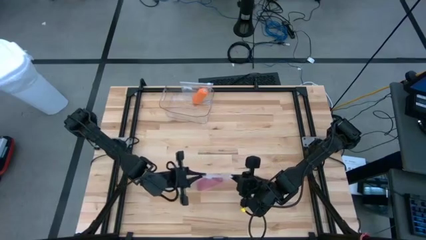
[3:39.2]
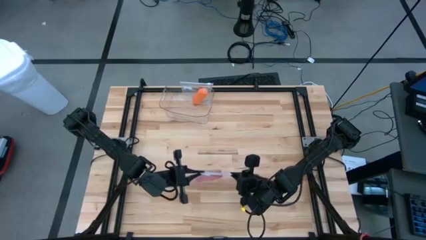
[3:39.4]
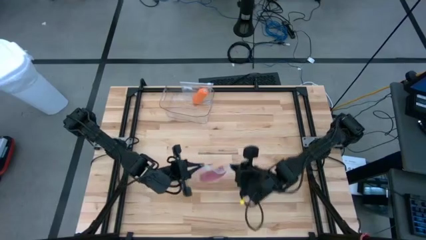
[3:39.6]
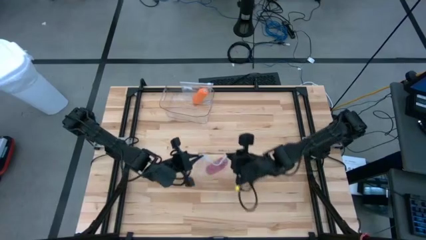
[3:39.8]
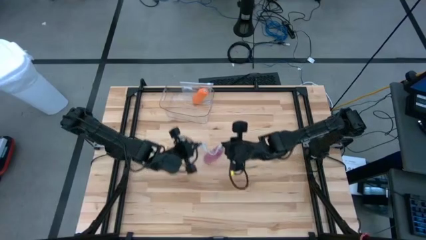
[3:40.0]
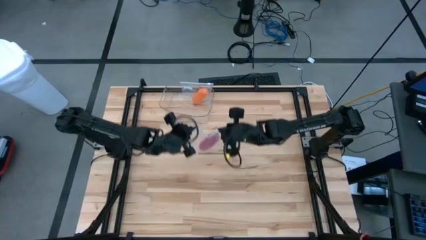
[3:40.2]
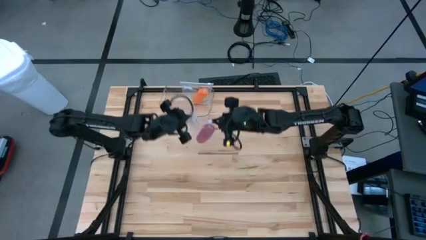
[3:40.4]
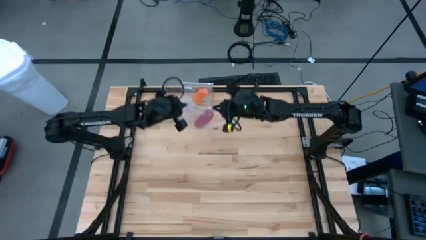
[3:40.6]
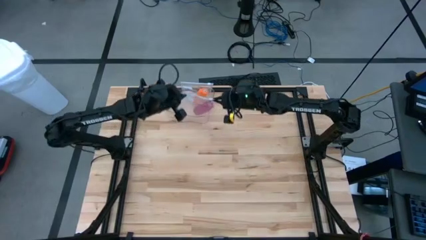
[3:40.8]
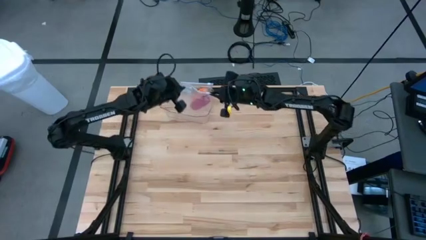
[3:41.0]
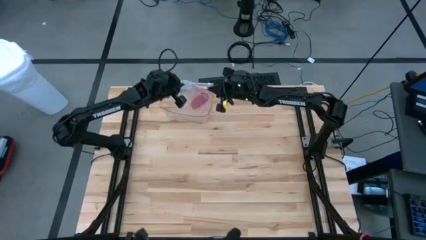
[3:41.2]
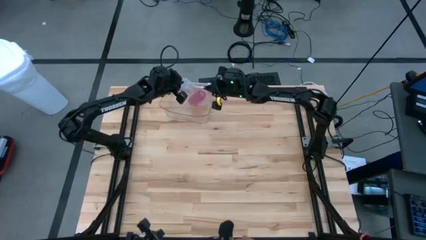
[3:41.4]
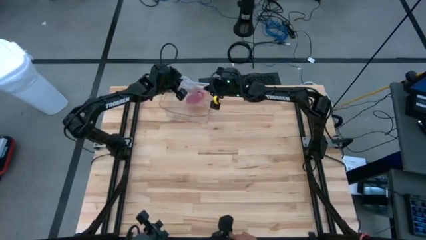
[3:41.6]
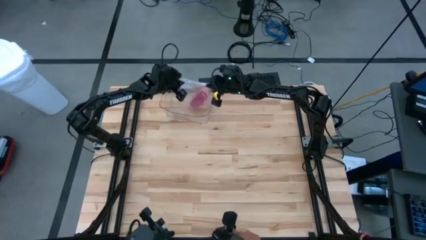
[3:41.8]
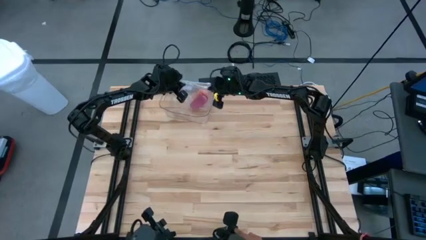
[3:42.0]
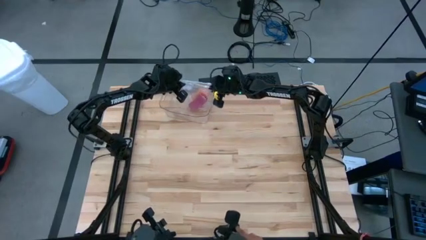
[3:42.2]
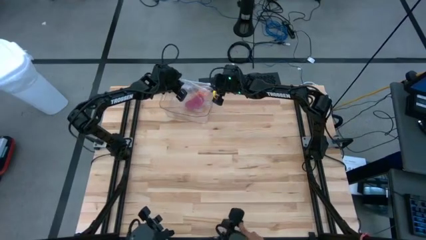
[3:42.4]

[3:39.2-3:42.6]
Task: Roll bandage
Put the packed rolled pink bandage into the transparent bin

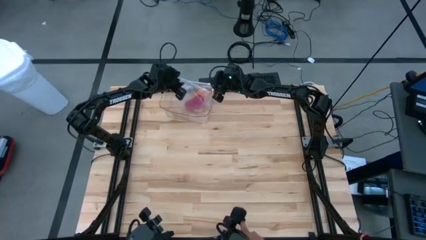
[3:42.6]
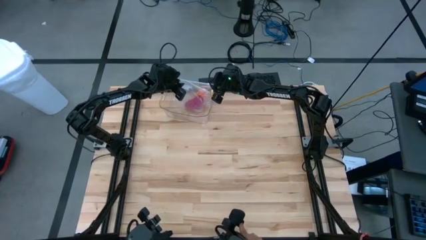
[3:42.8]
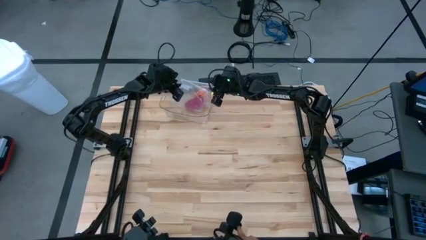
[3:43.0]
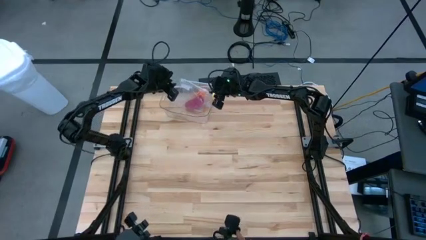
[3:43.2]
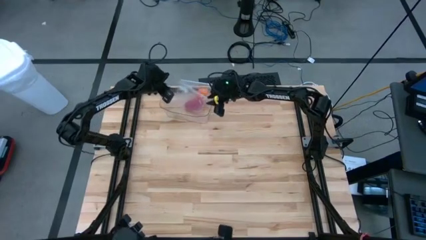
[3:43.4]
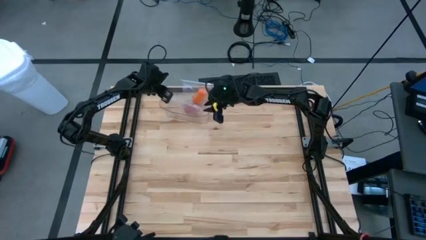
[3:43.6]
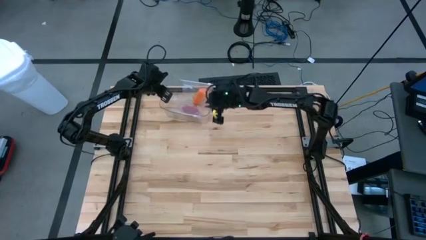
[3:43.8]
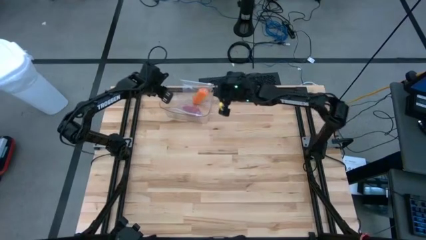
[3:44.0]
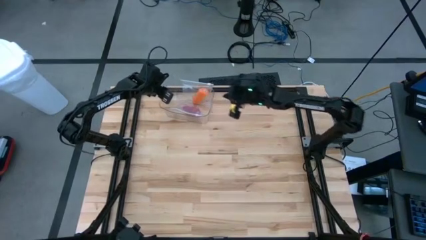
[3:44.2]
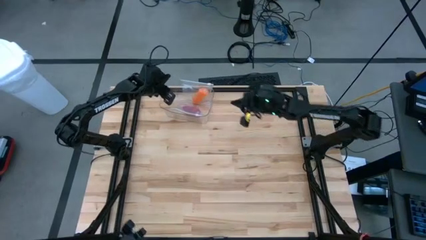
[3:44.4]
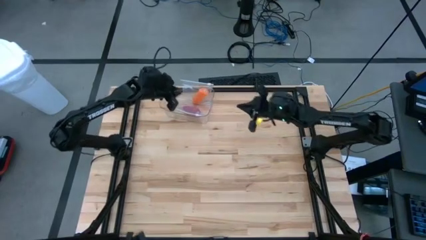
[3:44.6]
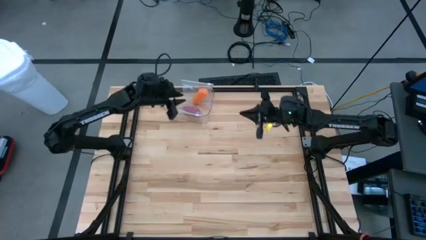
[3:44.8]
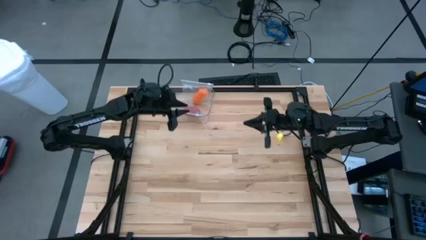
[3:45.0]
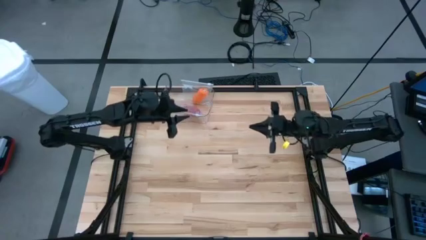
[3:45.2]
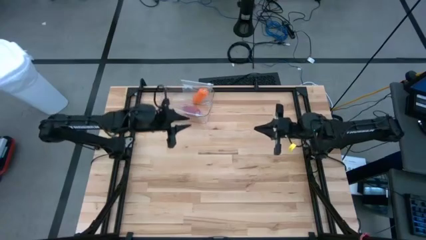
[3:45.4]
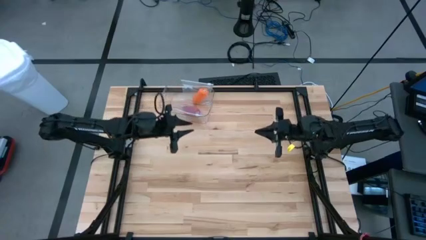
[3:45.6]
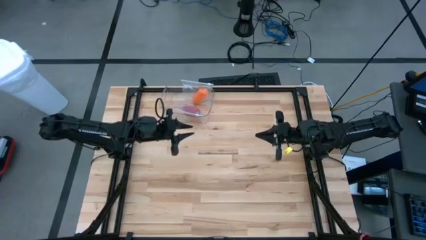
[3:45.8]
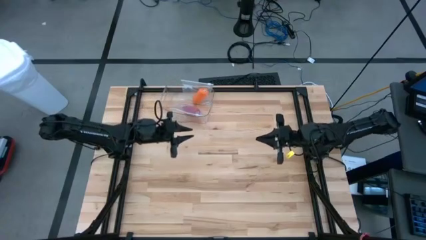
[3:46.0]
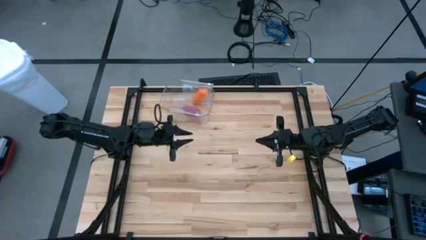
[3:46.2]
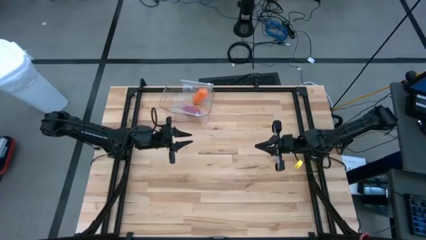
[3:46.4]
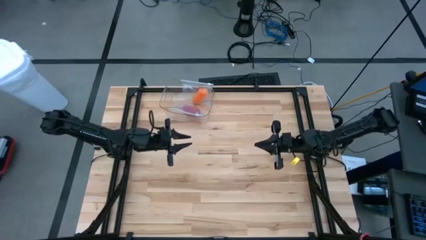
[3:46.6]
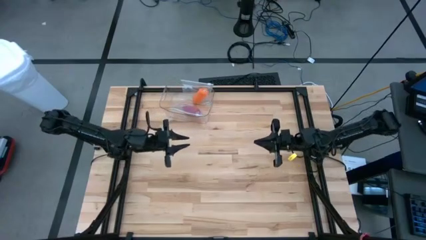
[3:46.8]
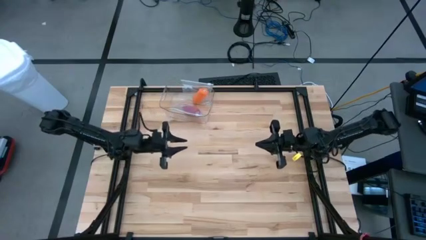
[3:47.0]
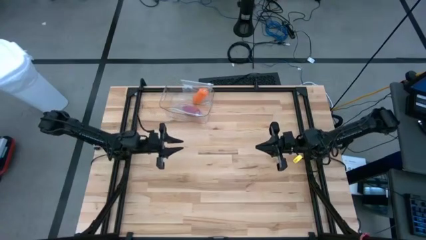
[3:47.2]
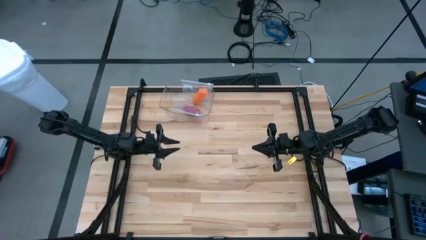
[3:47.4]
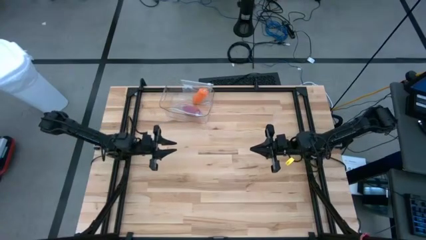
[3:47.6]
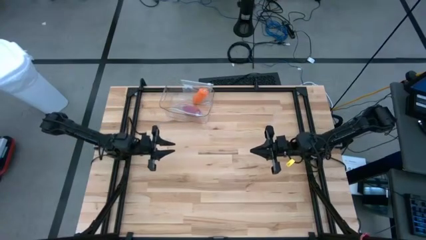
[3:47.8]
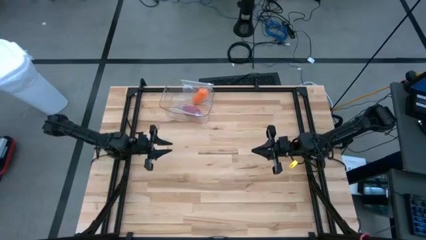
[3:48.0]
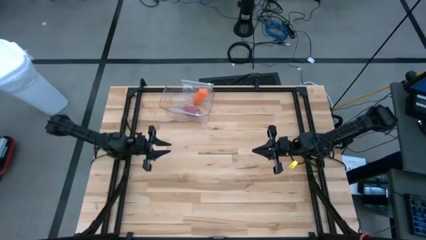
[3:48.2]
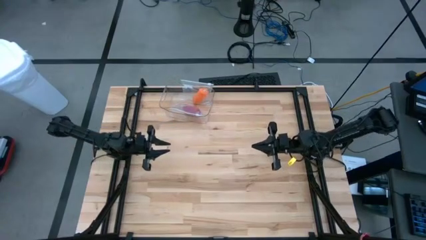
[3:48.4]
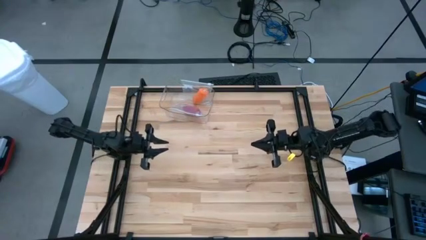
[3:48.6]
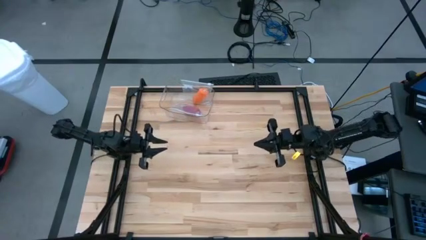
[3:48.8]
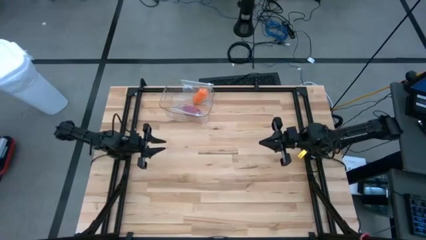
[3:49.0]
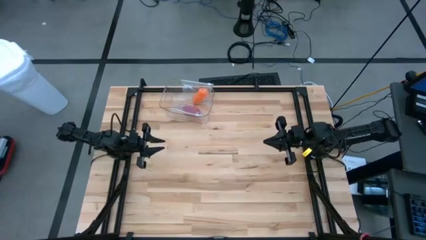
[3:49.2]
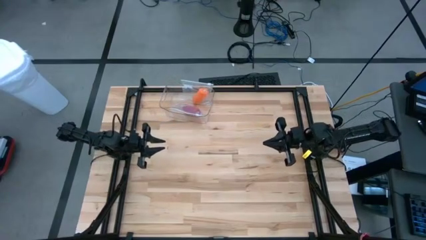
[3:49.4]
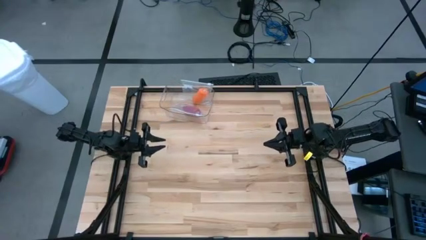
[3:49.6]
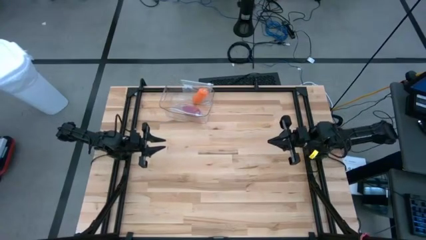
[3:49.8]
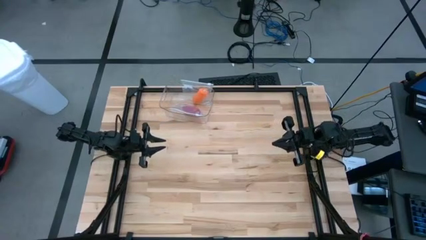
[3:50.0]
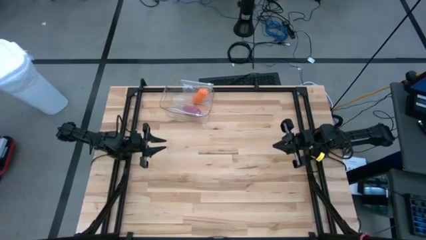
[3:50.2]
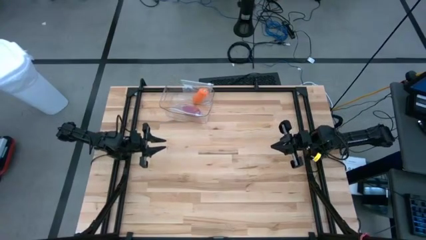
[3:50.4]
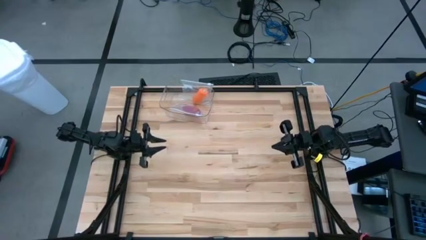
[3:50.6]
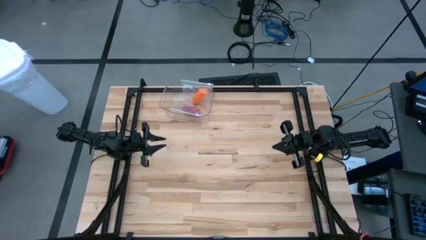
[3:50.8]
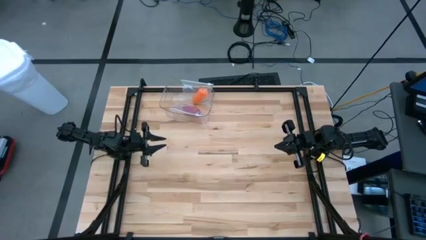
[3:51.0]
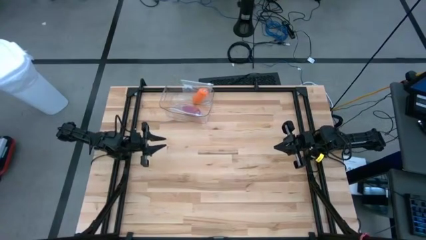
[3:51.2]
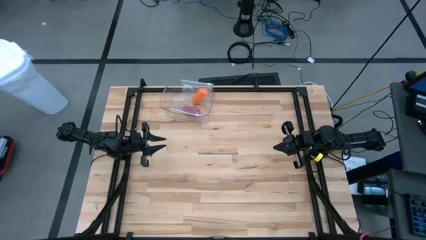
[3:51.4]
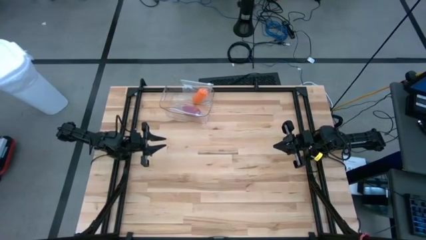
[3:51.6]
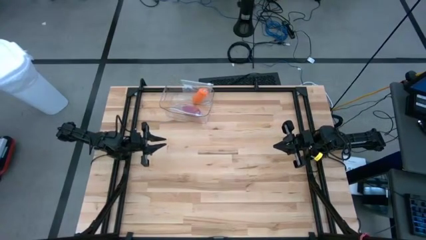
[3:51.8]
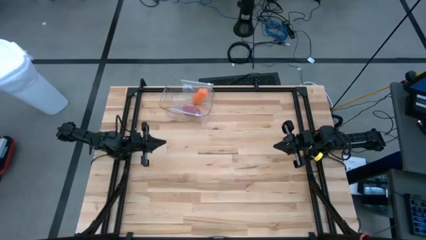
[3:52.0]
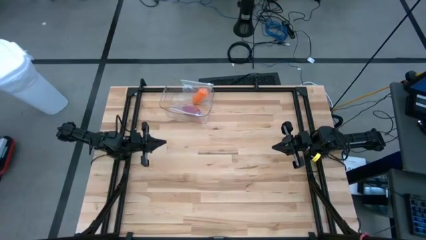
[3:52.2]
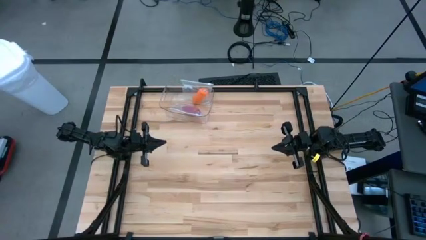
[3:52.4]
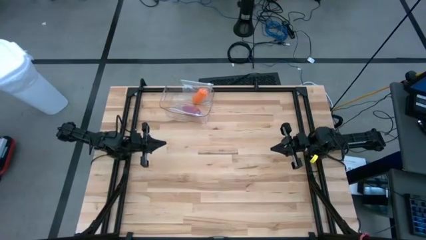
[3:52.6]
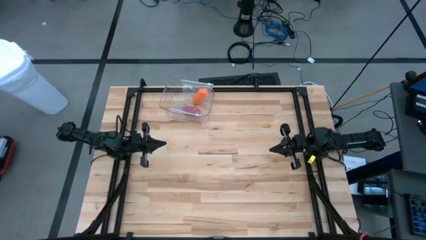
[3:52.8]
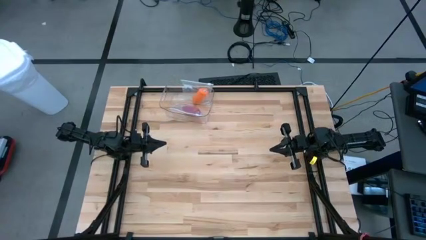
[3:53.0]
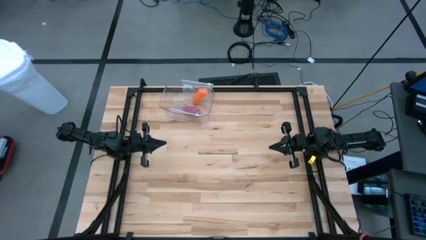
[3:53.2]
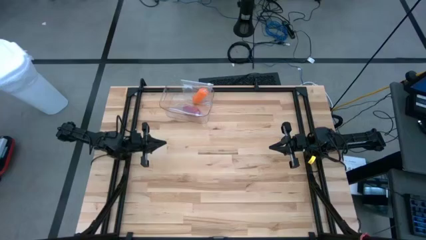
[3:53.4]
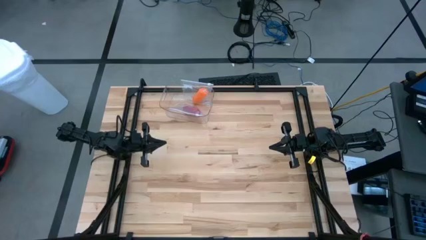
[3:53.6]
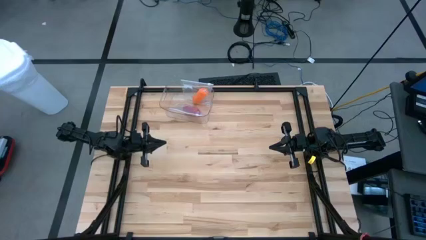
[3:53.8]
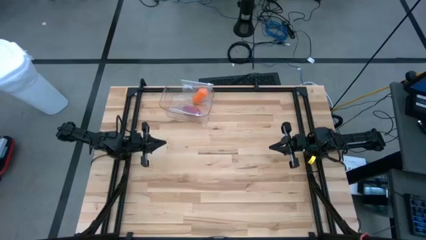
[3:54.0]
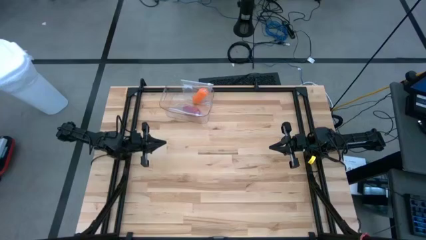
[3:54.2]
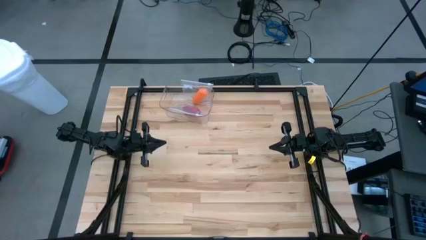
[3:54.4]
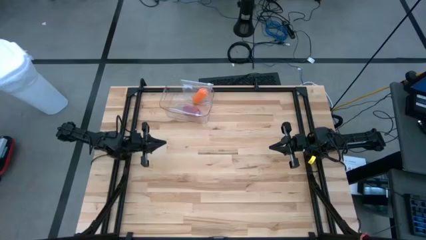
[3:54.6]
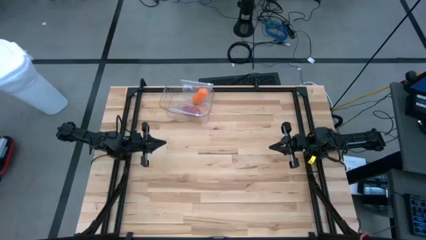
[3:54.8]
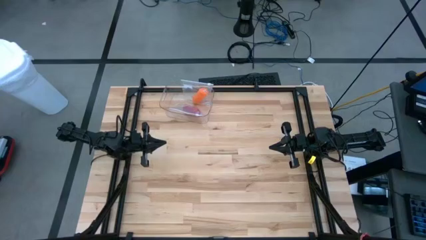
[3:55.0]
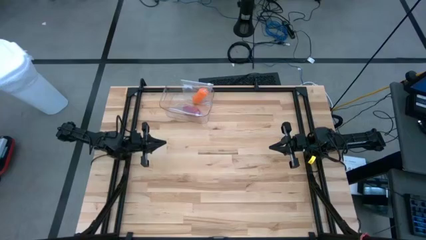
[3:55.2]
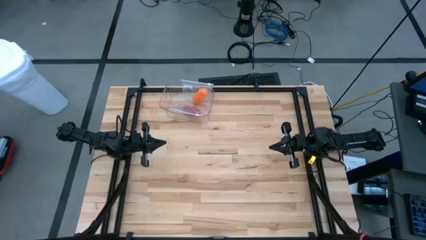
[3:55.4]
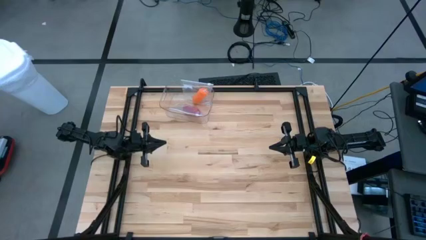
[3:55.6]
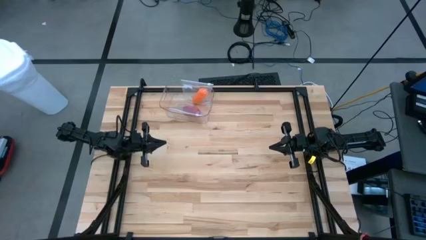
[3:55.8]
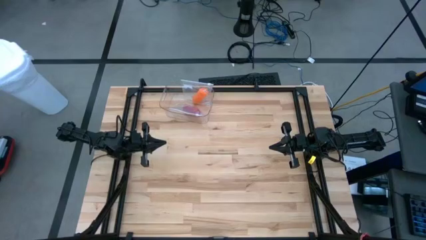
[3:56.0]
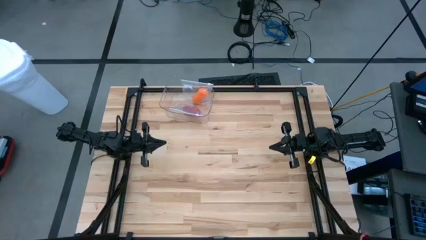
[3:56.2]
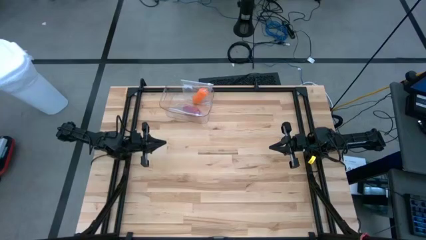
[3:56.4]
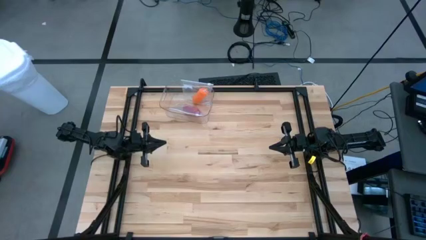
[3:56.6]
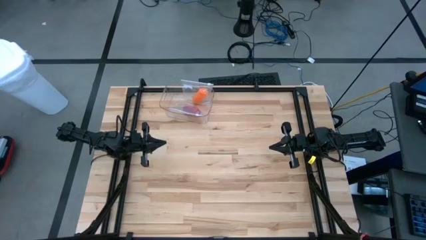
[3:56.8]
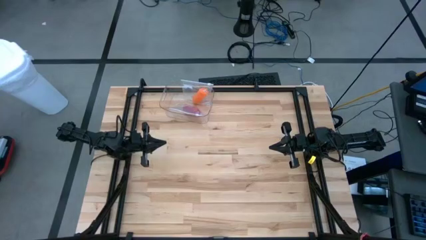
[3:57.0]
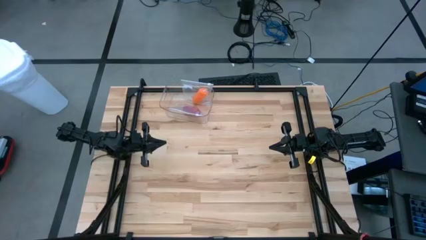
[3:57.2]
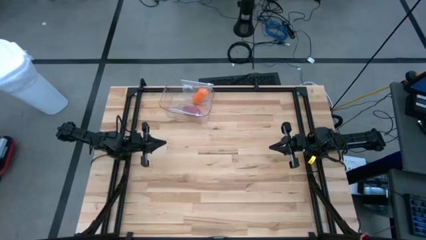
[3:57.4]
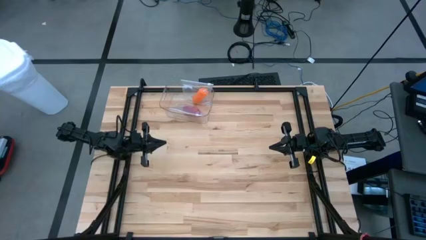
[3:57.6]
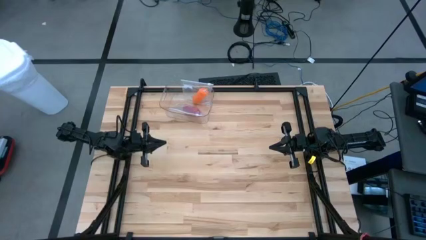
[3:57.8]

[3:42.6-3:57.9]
Return to Home Position
